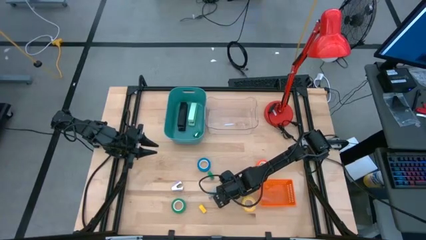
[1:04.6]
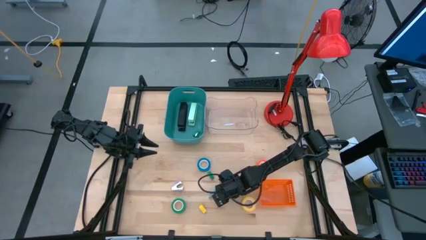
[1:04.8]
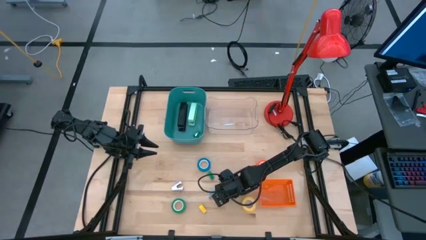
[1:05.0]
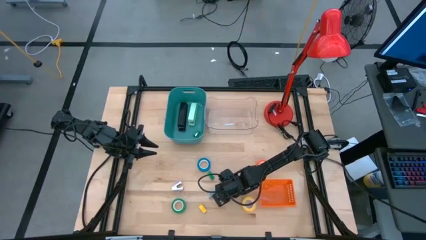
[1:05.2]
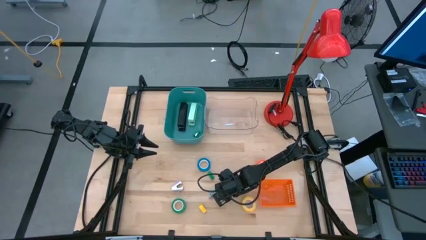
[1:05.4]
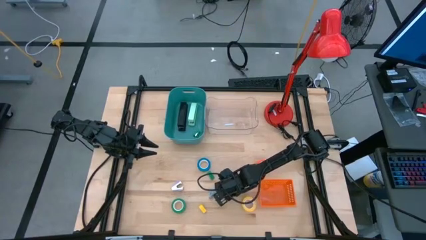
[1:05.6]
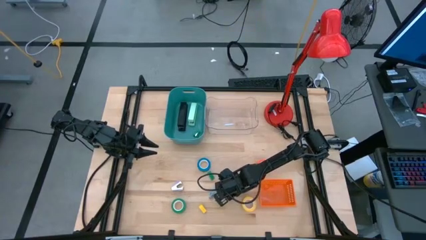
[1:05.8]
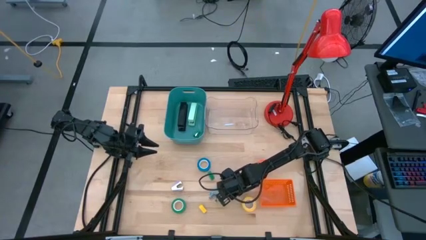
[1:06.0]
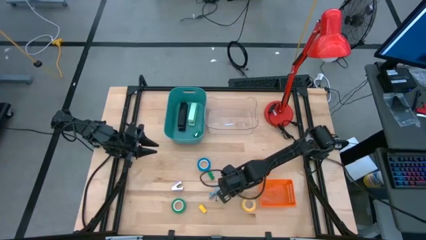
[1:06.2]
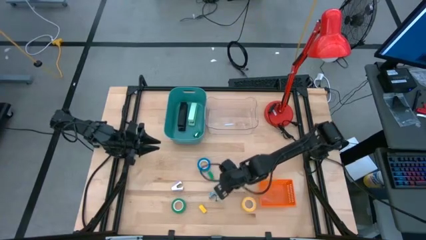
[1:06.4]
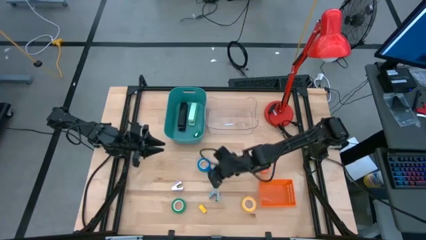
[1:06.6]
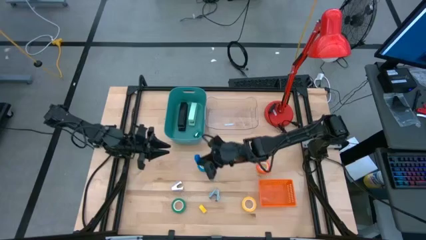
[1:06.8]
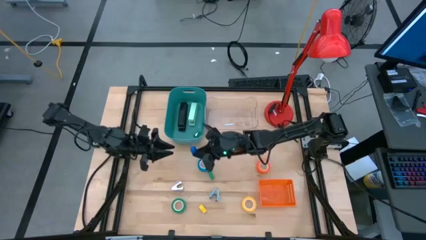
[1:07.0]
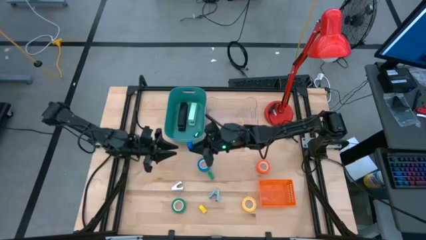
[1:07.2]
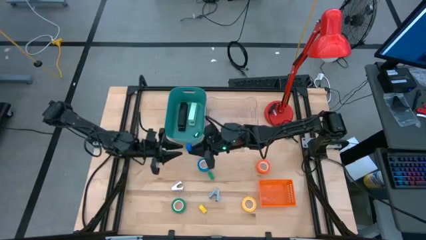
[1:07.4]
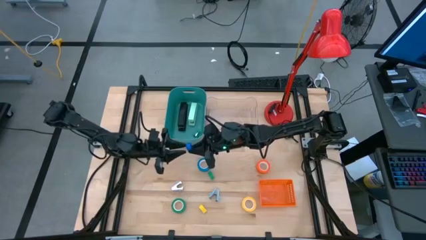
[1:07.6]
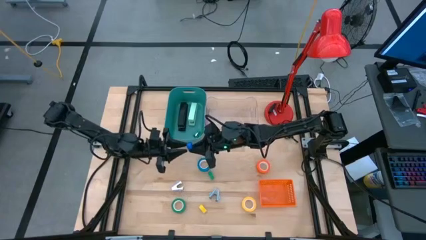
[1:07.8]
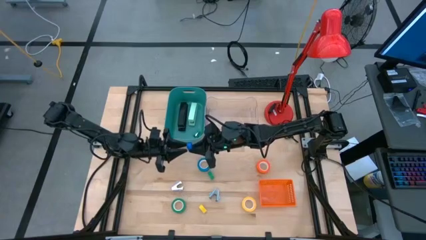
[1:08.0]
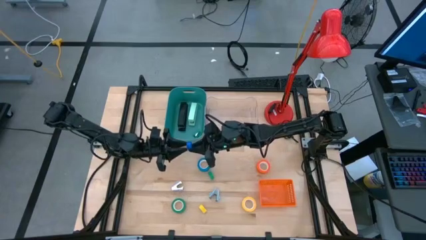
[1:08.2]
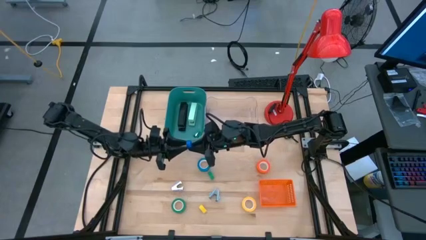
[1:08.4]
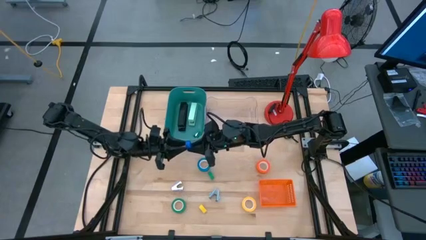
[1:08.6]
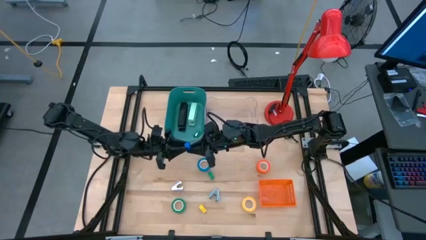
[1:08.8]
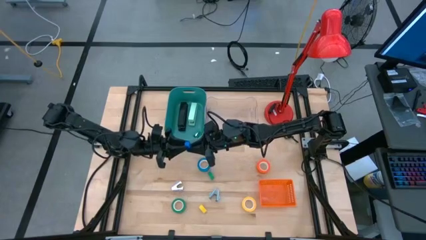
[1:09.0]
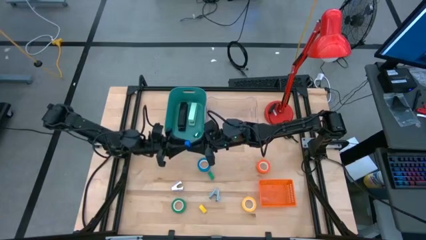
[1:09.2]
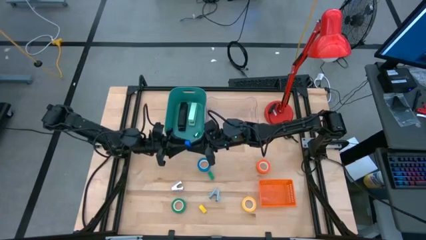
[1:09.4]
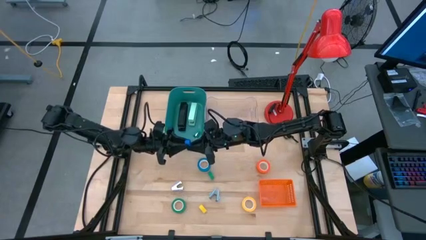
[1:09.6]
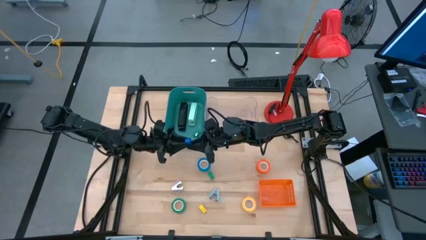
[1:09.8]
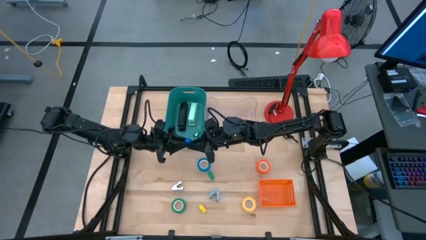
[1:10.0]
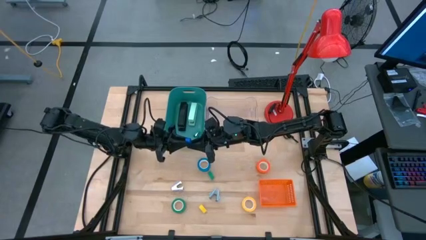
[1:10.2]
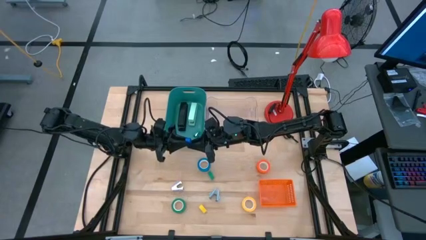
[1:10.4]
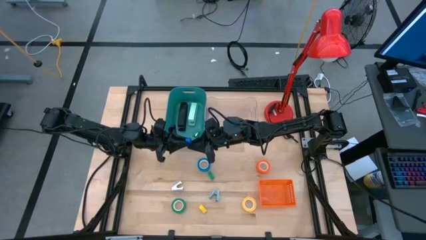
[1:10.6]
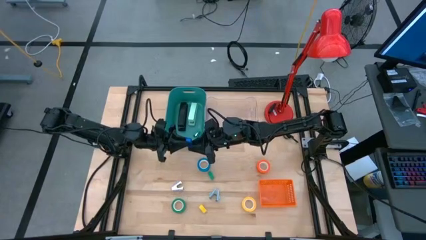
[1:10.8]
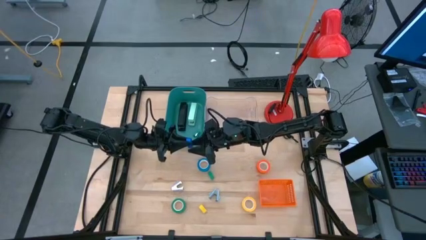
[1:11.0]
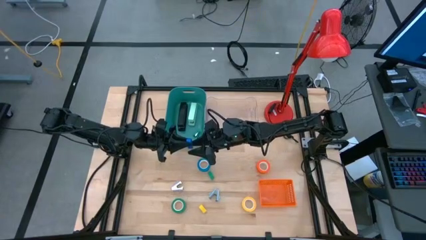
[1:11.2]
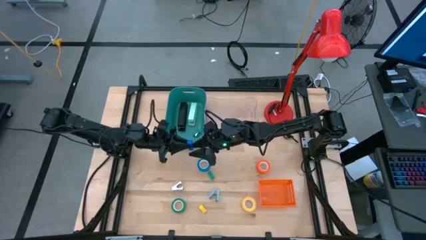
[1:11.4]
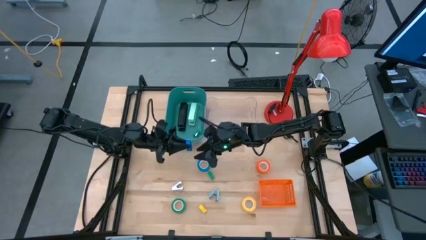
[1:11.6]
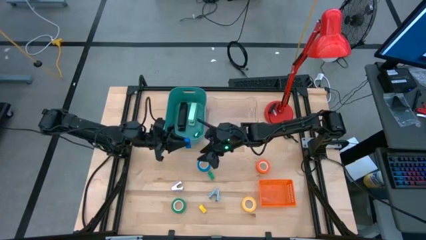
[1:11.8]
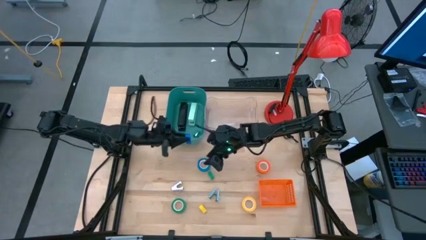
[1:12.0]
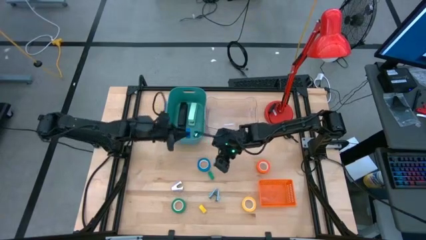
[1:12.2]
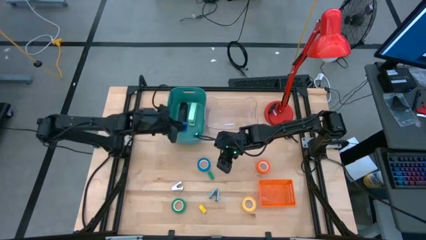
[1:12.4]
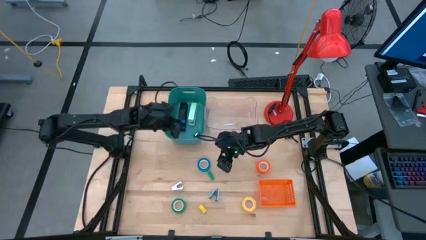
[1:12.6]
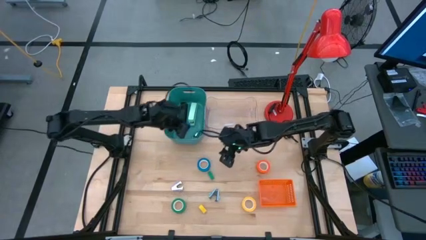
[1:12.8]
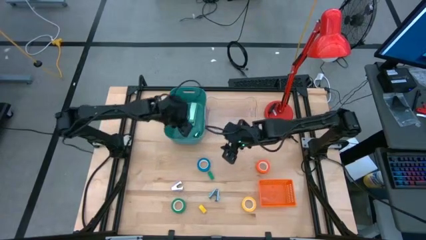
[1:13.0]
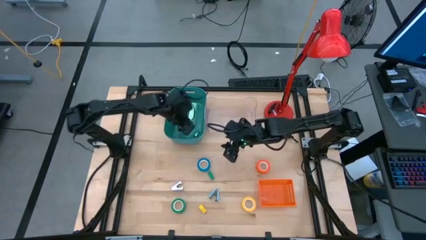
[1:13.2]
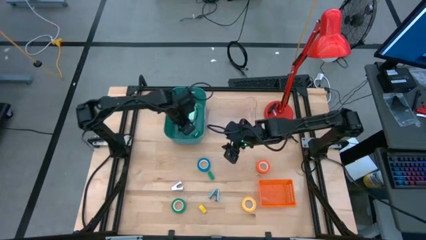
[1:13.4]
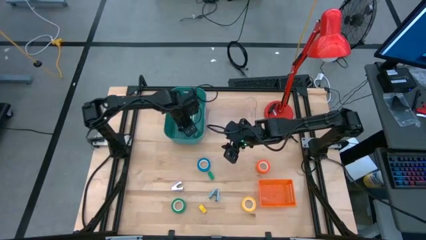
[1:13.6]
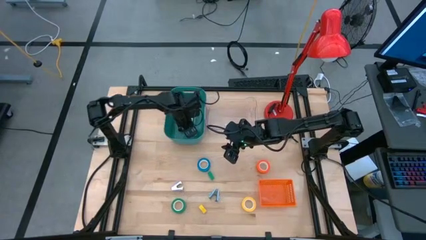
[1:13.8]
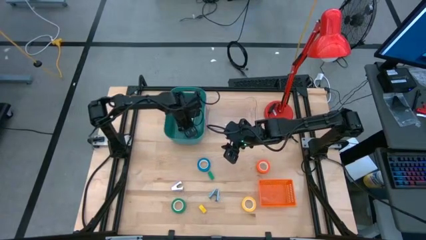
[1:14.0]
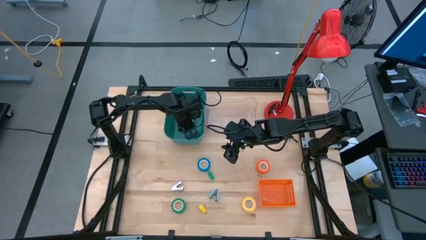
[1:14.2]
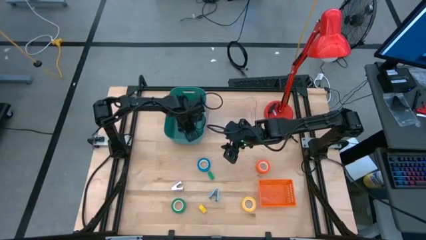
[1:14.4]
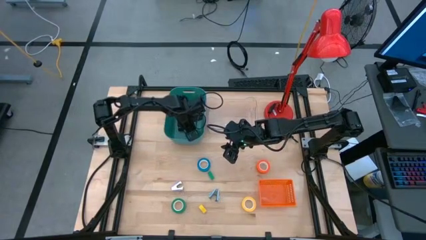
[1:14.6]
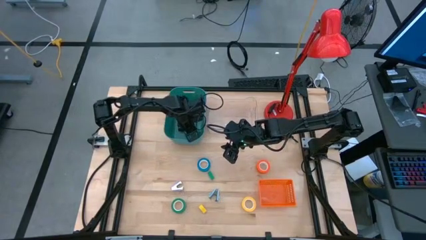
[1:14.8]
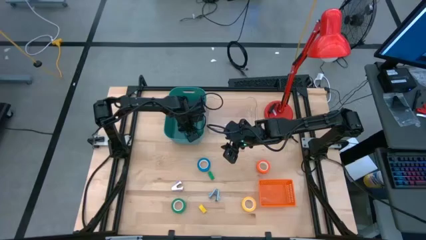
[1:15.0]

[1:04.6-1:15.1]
Task: Pick and place Stapler, Stapler remover, tape
Put the mini blue stapler into the blue bin

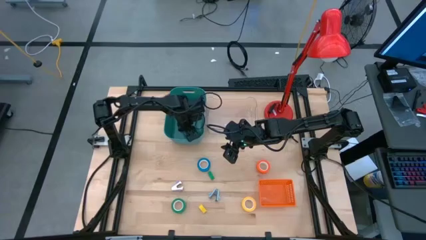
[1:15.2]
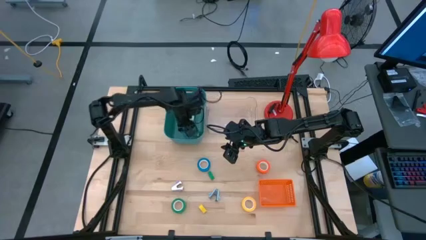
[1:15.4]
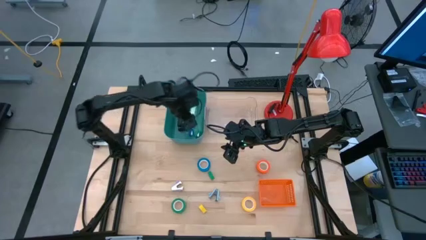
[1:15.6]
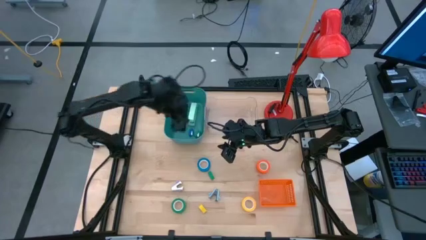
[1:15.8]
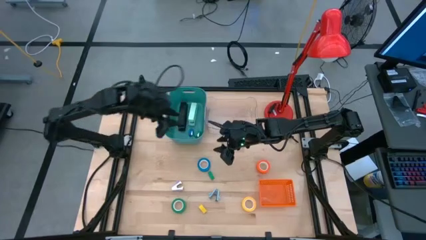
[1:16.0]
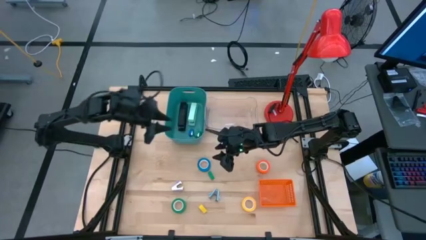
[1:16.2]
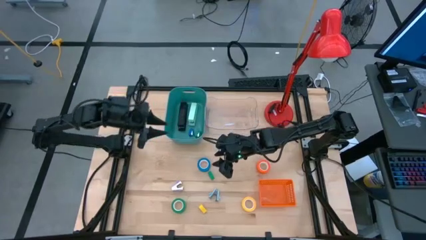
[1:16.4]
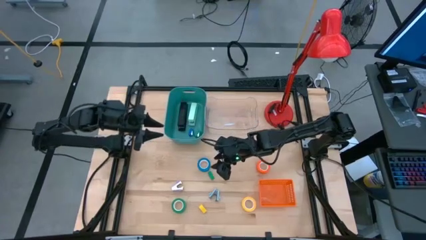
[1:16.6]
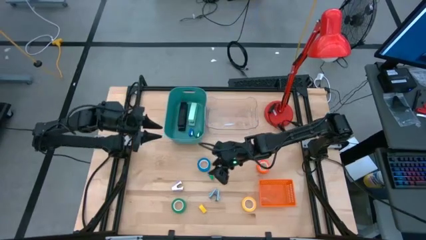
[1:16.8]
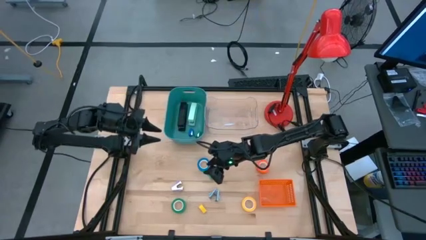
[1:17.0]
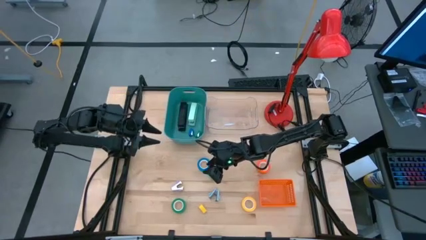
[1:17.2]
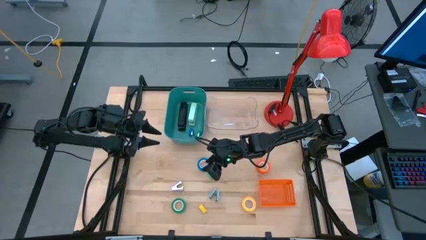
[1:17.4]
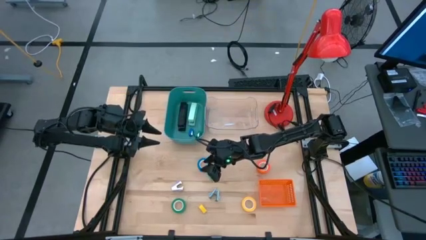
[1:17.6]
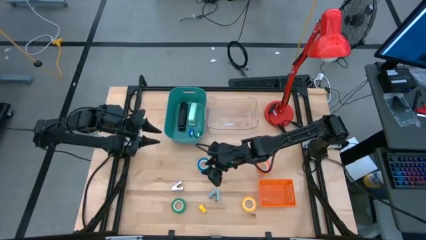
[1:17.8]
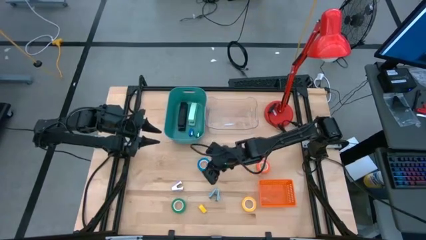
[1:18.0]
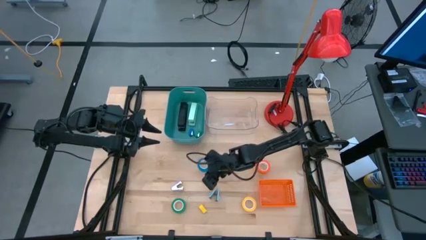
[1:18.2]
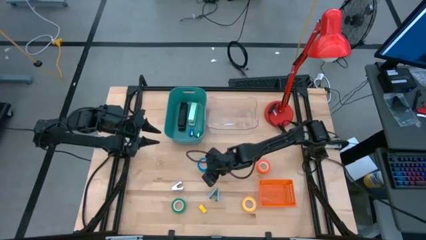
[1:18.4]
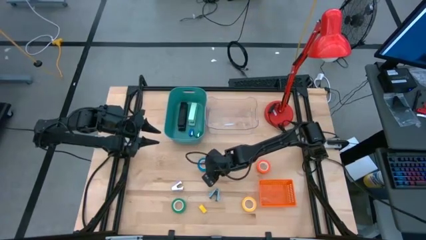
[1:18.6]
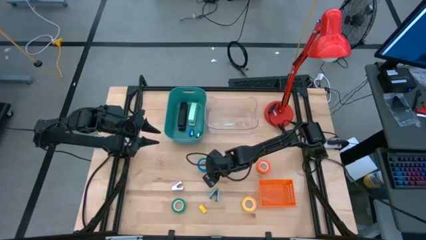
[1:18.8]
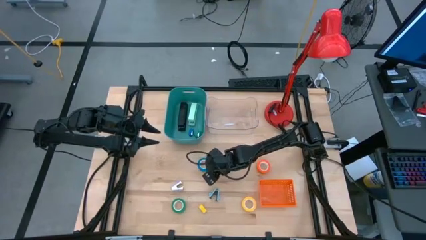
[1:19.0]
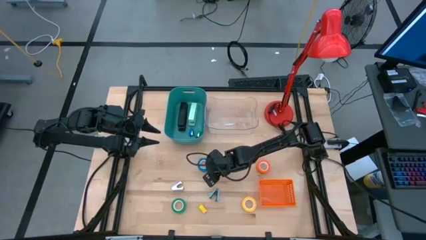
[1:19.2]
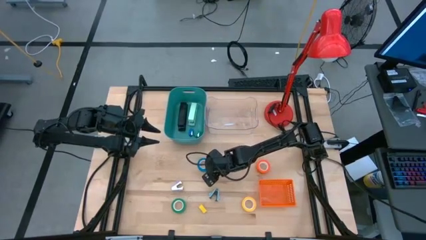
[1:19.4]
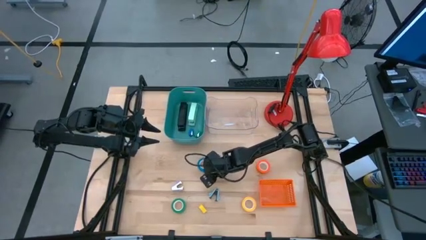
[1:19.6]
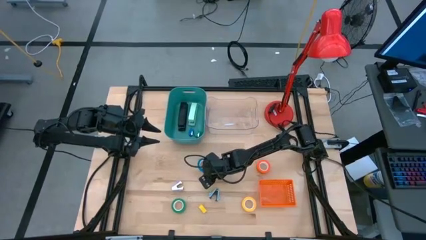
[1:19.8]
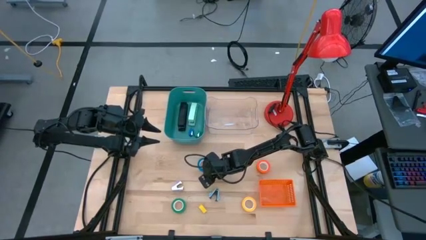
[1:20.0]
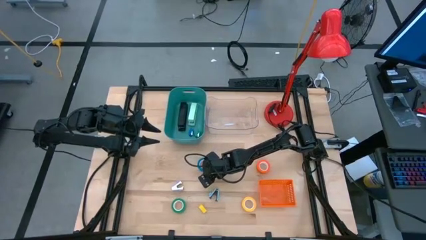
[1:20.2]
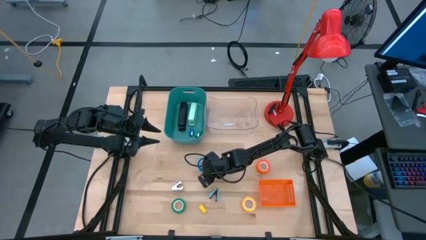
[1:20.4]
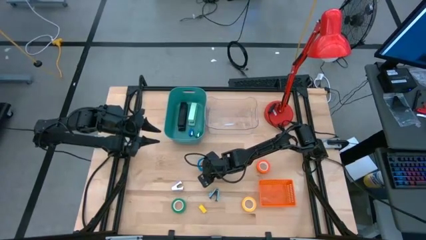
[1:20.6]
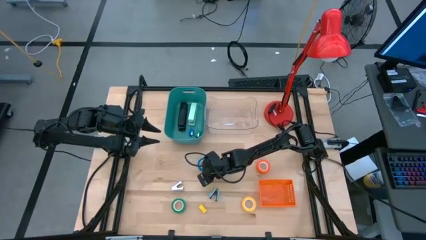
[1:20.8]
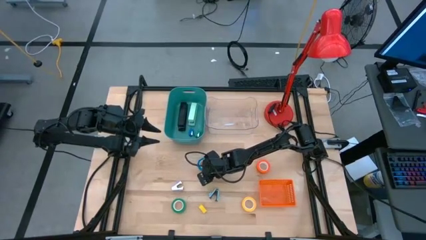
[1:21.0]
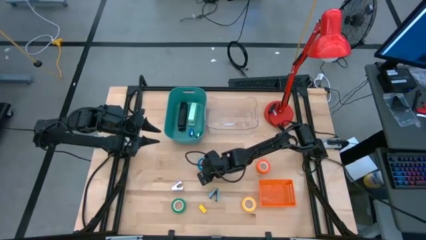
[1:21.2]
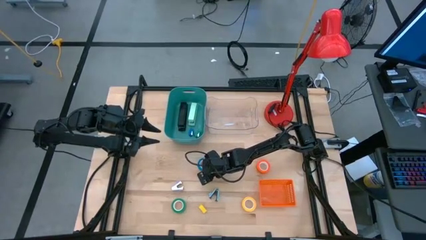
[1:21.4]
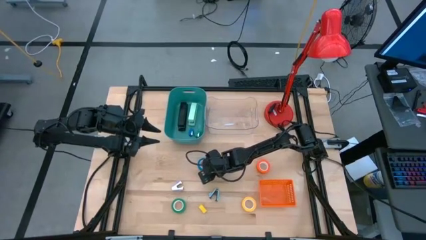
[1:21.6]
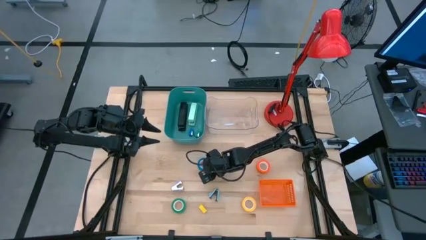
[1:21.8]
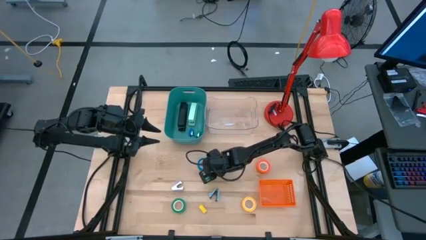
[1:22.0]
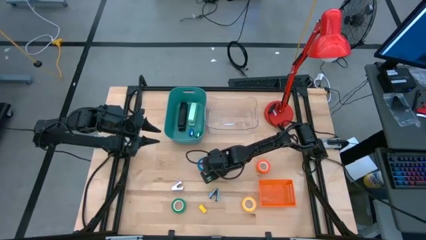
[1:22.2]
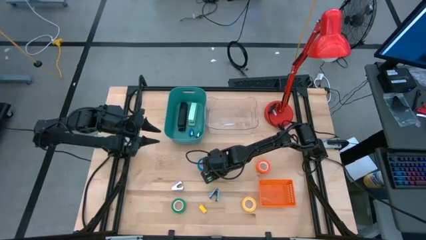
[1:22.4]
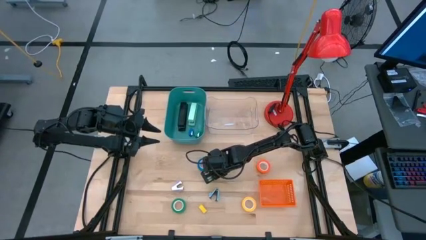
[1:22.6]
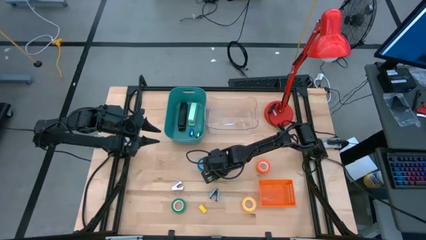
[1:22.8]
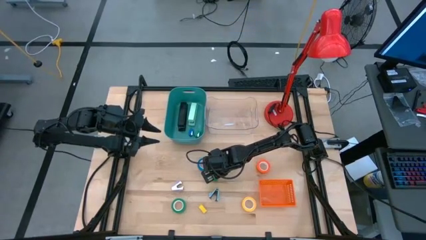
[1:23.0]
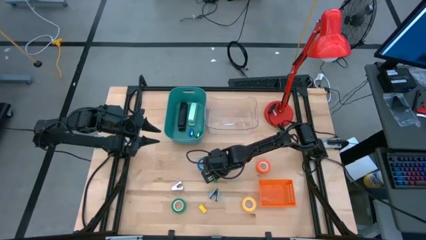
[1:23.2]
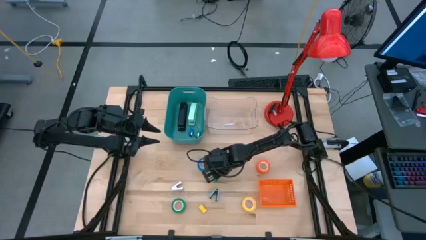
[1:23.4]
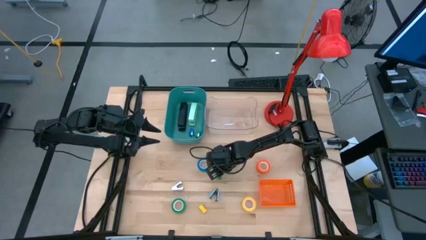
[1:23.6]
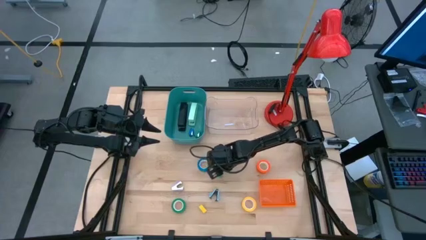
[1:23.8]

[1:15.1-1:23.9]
Put the mini green stapler into the blue bin
